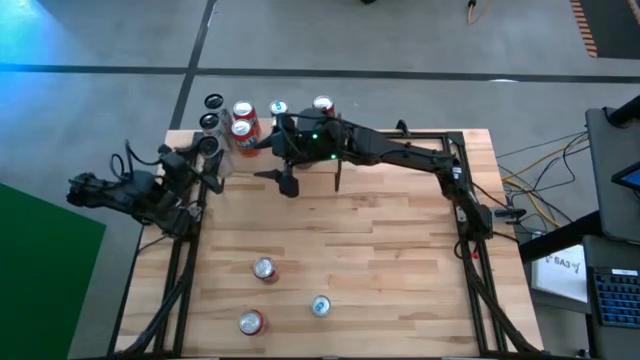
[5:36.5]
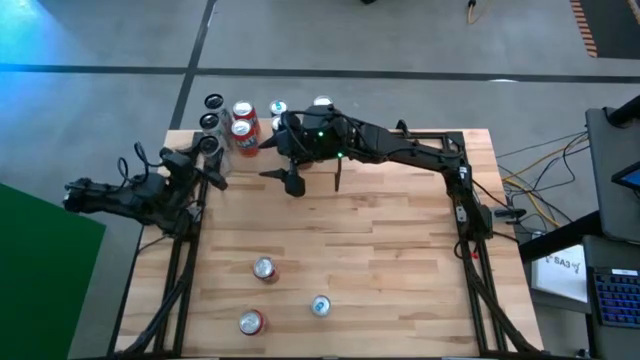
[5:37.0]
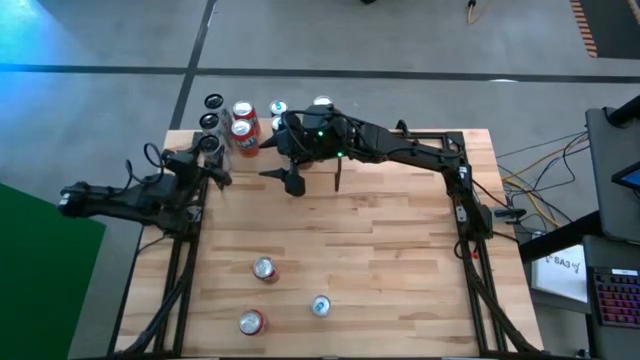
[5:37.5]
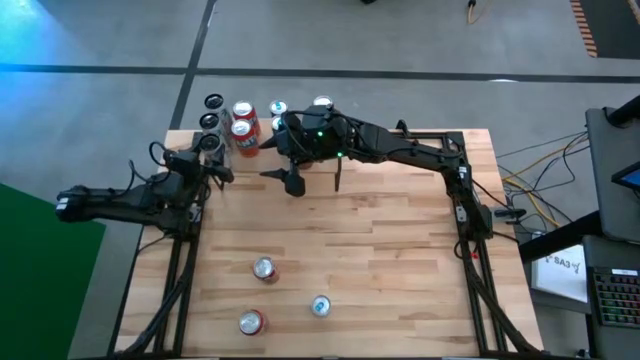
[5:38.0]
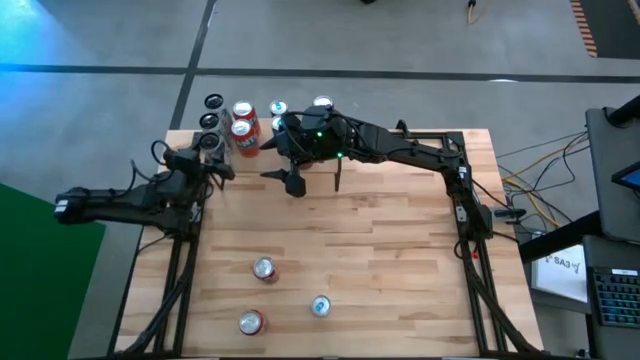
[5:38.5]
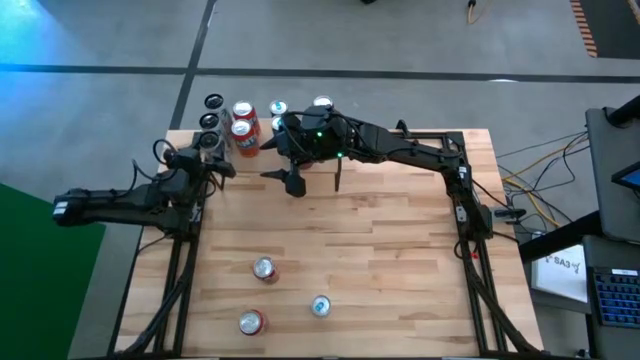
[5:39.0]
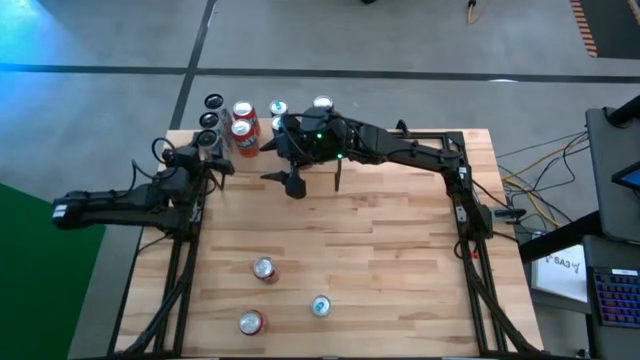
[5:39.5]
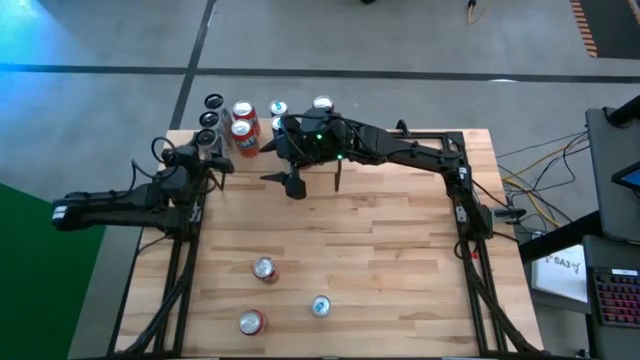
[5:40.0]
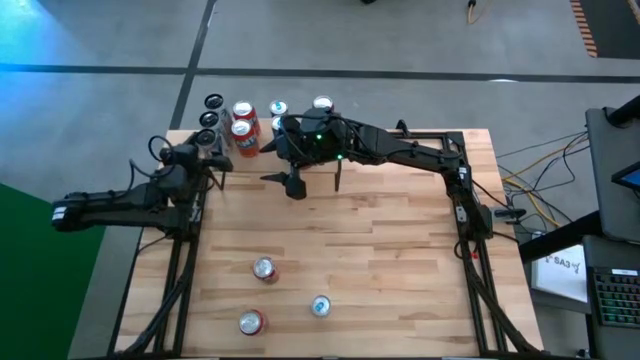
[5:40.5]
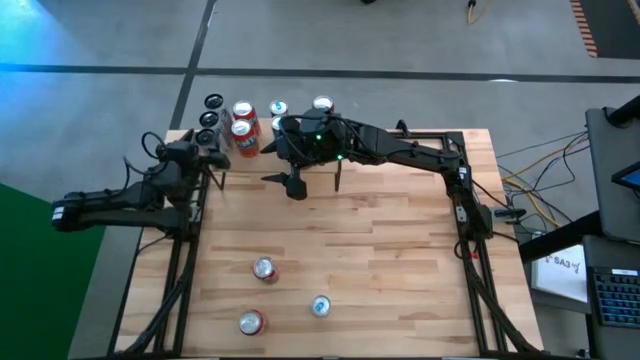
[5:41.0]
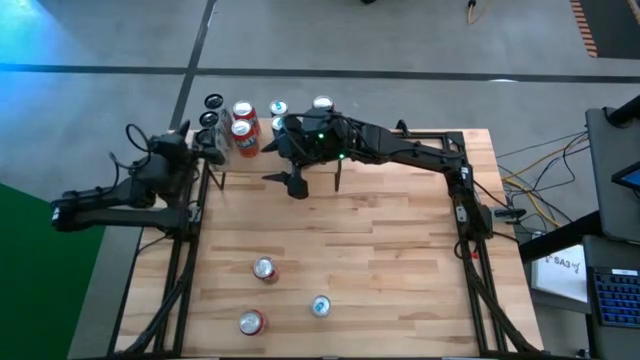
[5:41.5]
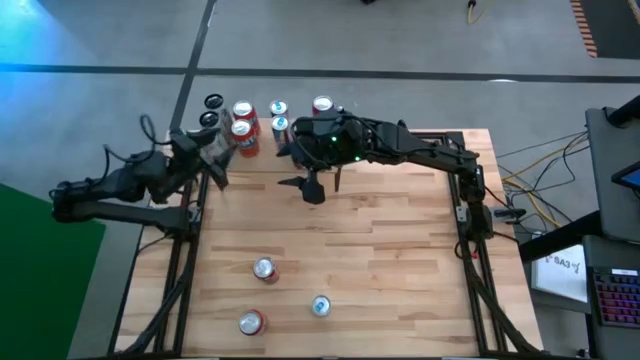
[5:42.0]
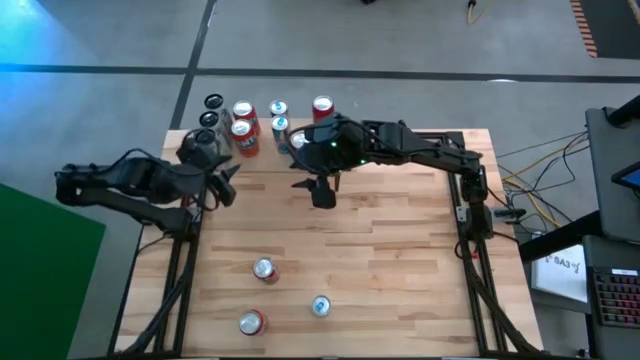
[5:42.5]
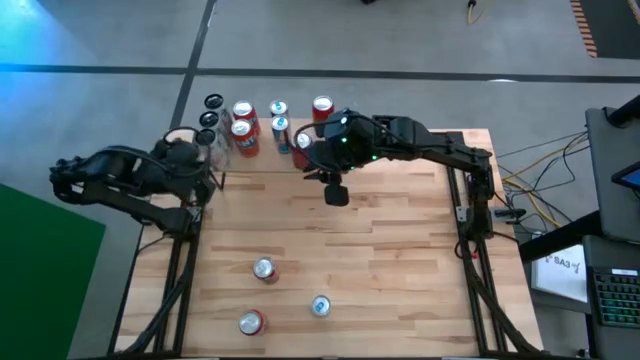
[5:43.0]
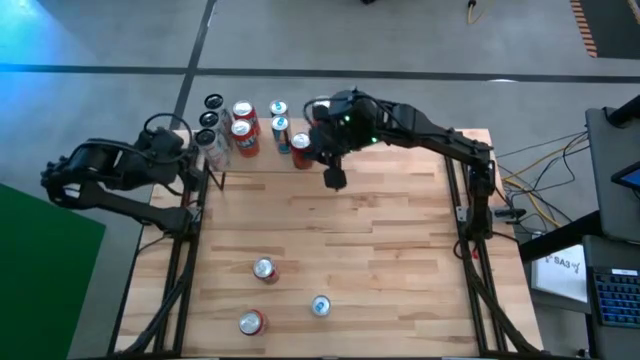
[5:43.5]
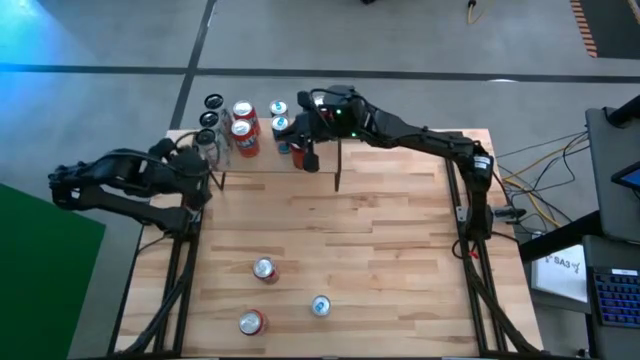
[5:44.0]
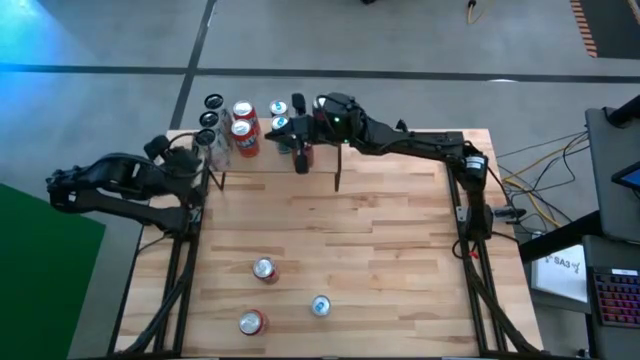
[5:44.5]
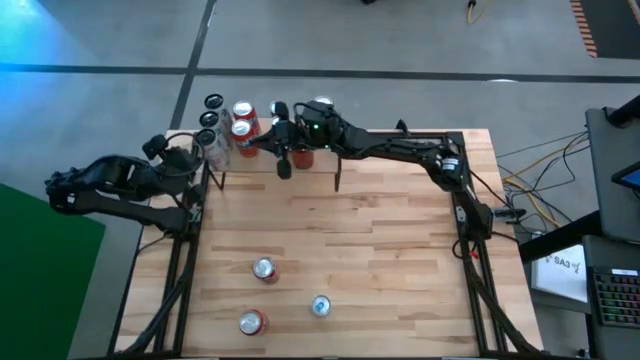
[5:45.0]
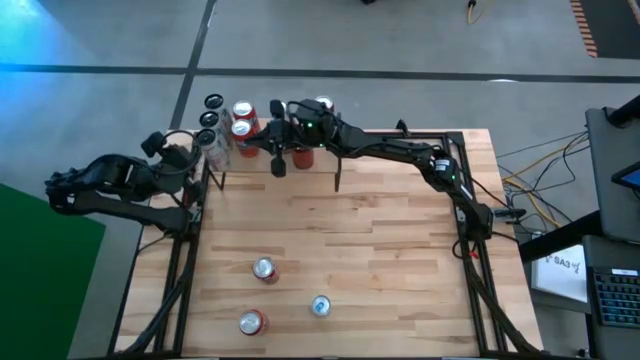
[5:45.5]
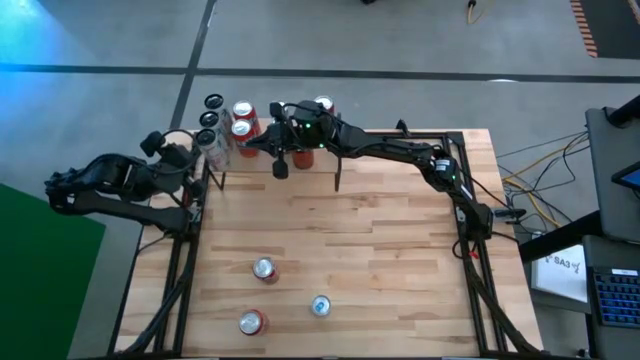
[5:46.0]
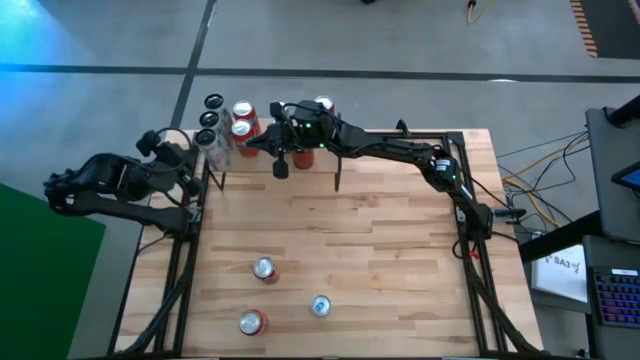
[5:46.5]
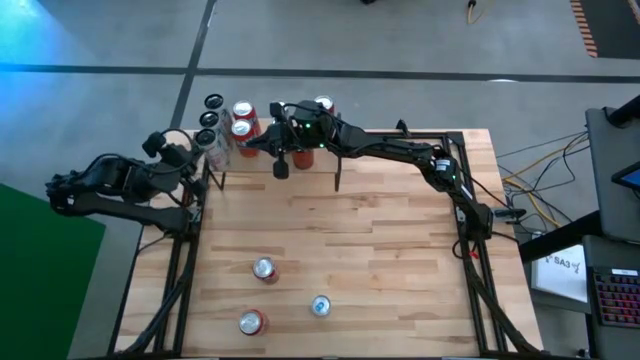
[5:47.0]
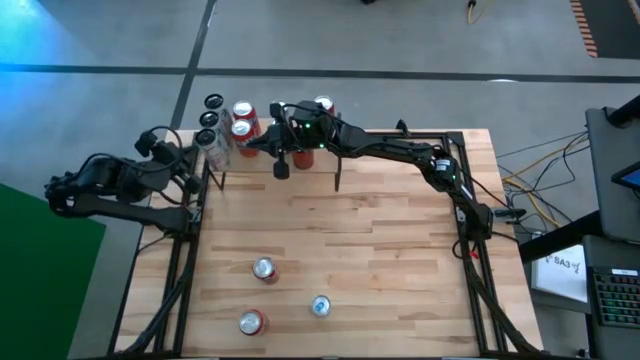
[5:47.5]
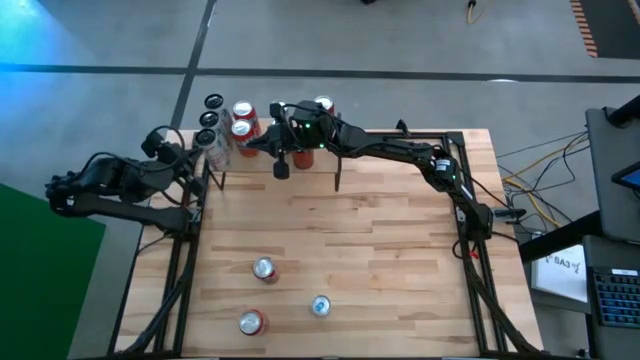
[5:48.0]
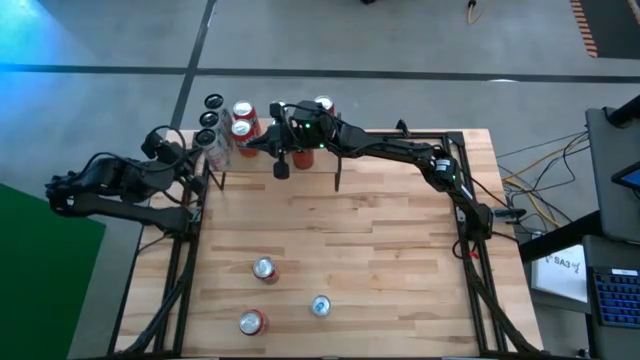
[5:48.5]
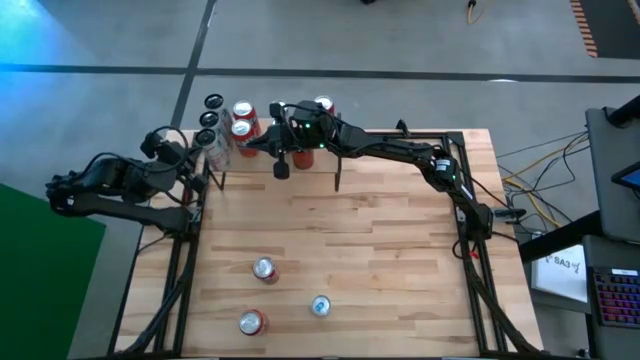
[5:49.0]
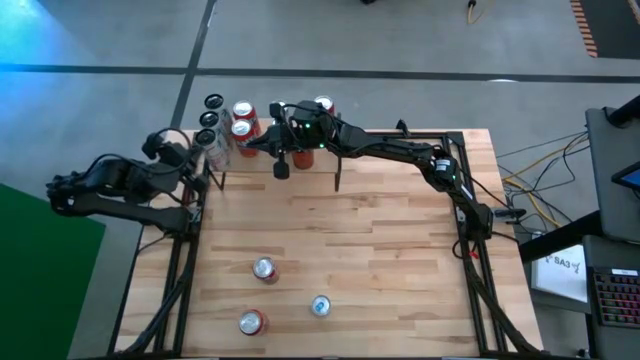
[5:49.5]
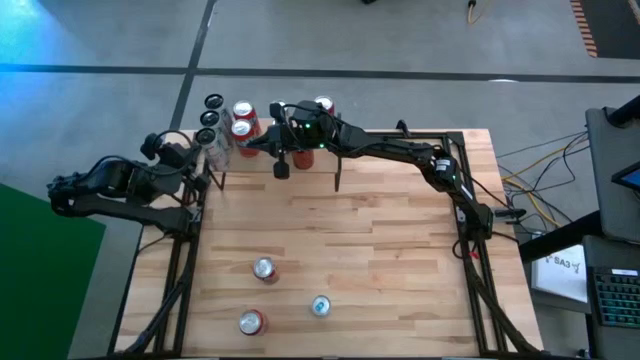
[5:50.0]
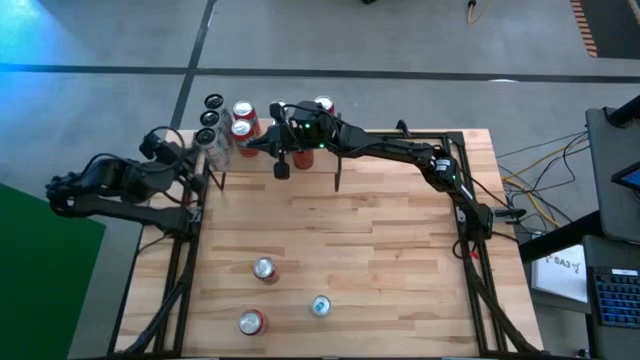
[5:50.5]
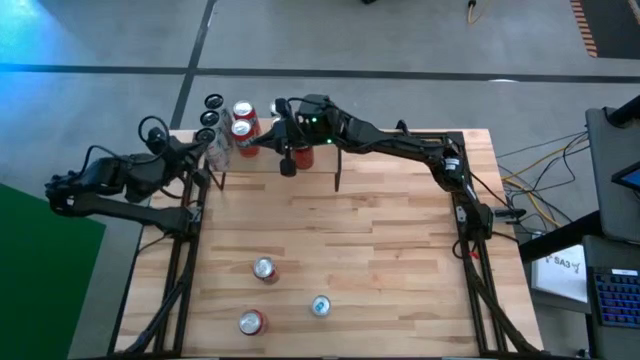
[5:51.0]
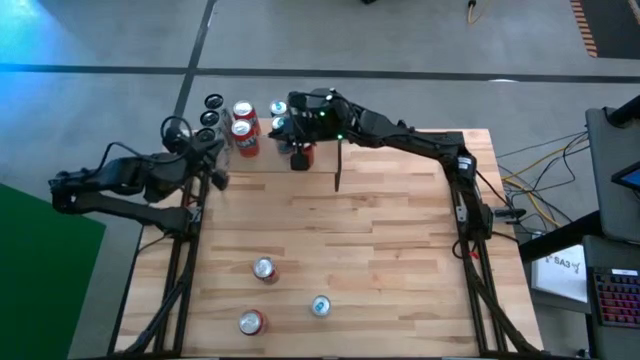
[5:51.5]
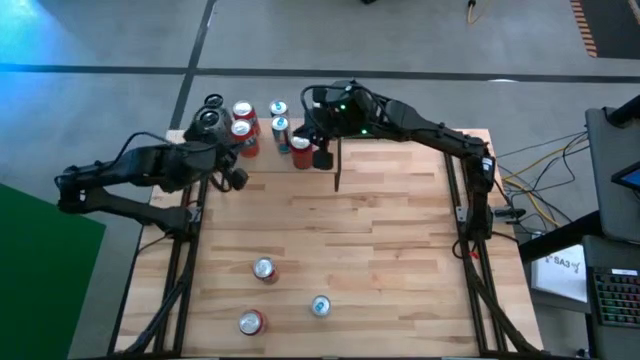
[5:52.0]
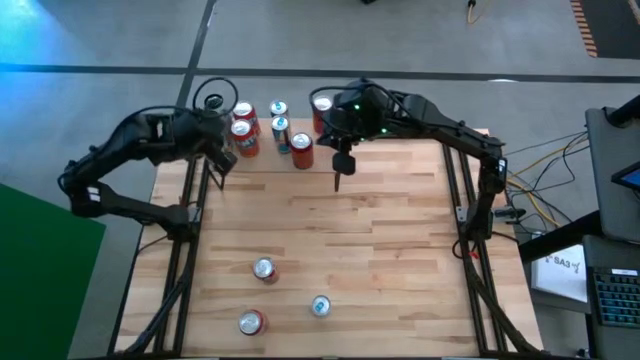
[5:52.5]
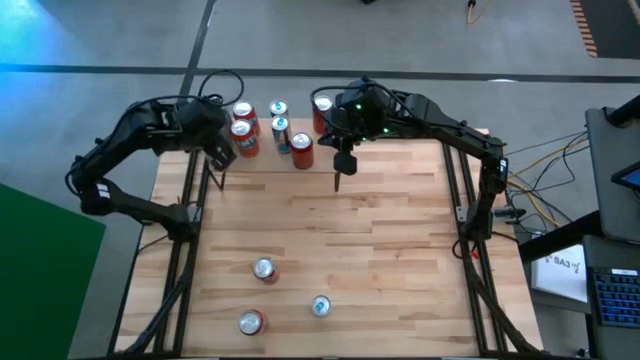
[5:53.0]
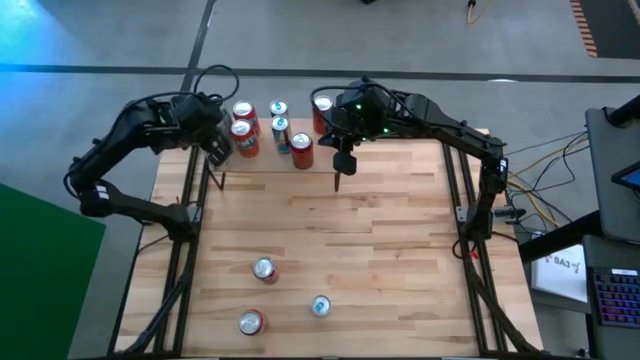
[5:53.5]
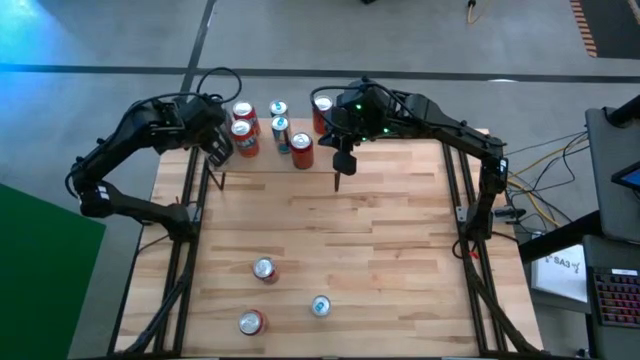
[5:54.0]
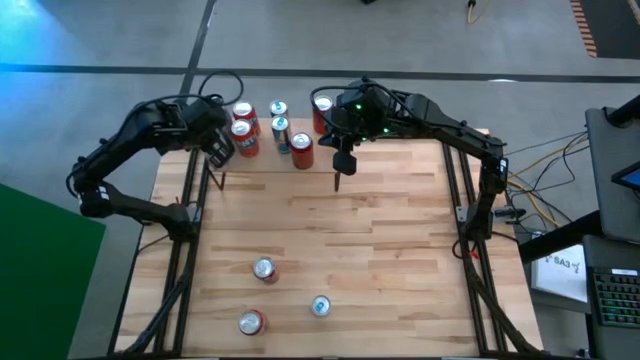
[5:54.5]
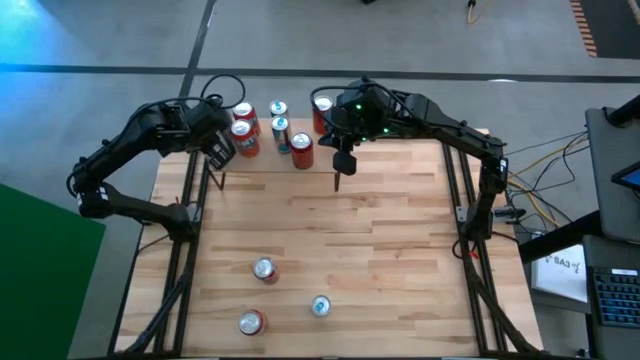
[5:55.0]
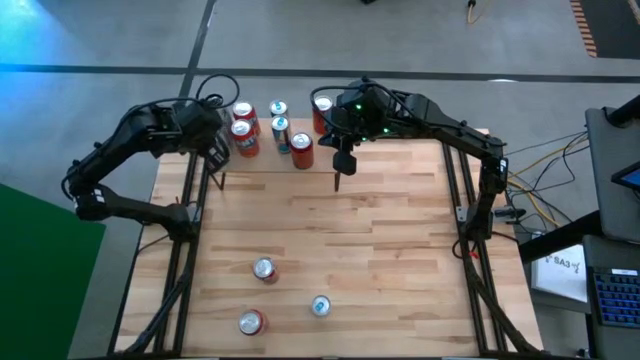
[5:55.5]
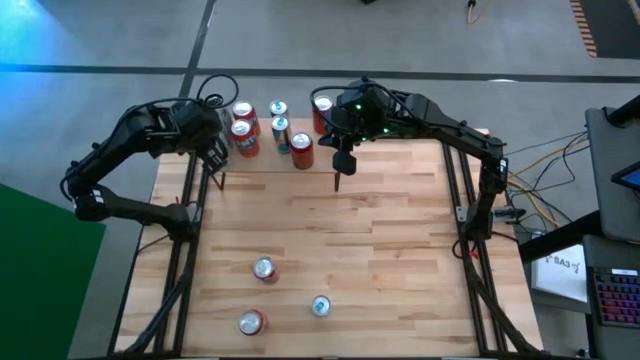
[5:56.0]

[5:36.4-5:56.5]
Task: Place canned beverage on shelf
Put the white pink soda can on the shelf aligned with the other white pink soda cans

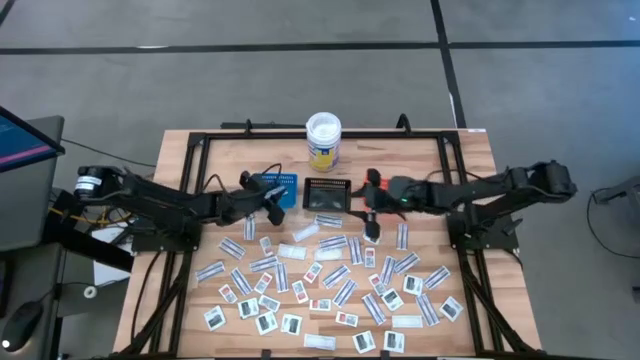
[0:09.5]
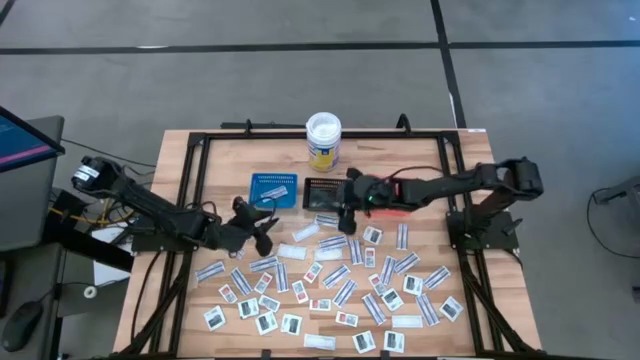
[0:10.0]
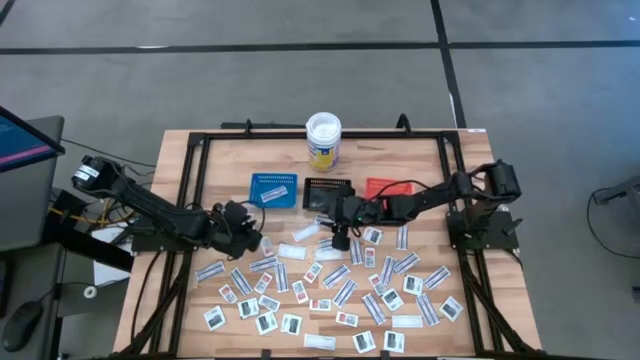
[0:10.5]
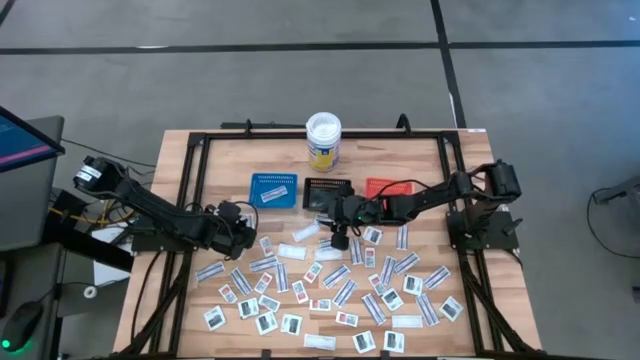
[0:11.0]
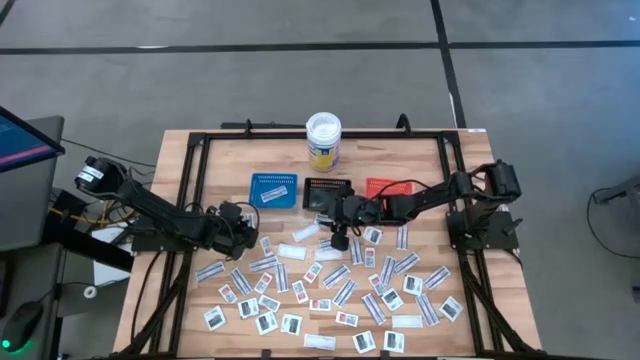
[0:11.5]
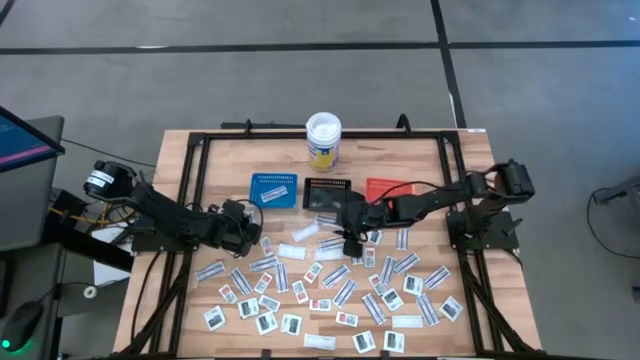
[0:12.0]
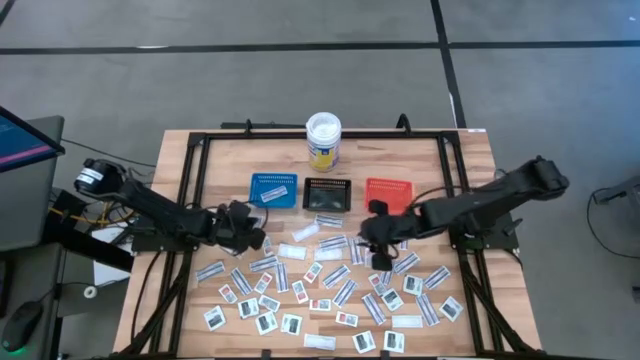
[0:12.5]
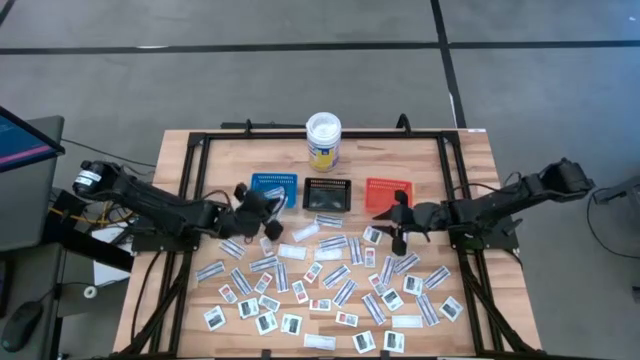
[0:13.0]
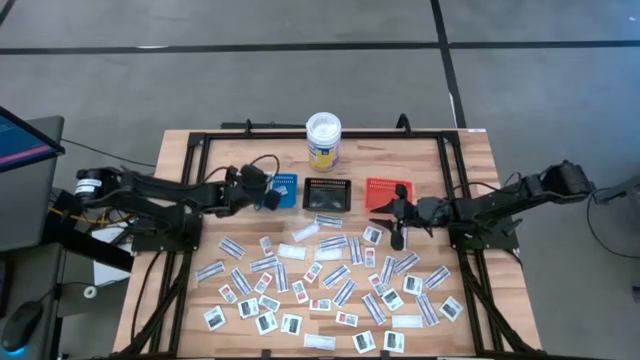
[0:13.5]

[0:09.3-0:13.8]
Task: Pick & Place First Aid Supplies
Put the blue bandage into the blue bin
